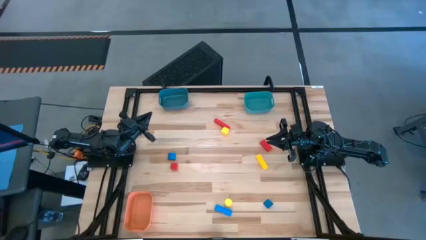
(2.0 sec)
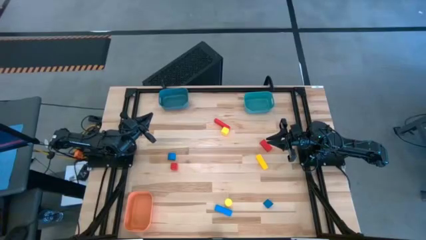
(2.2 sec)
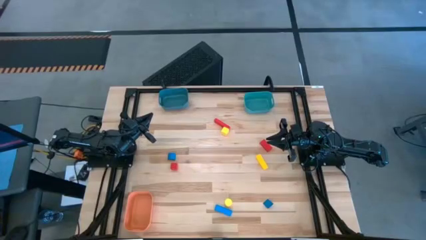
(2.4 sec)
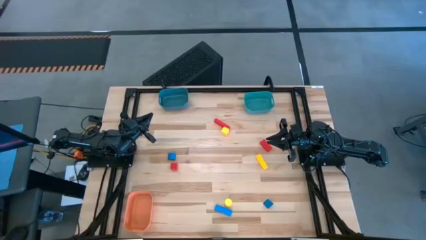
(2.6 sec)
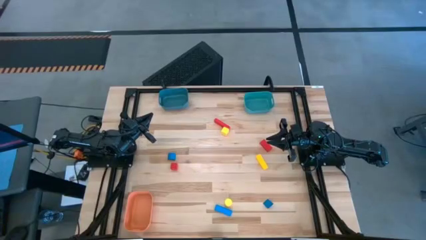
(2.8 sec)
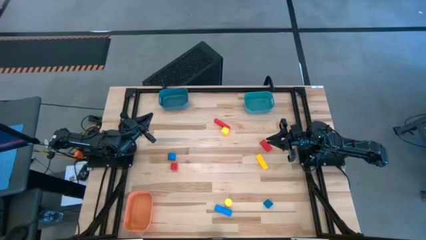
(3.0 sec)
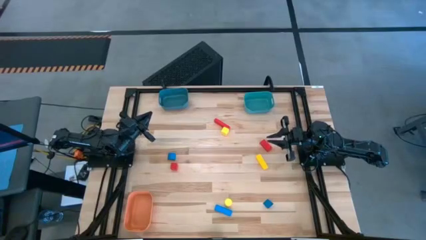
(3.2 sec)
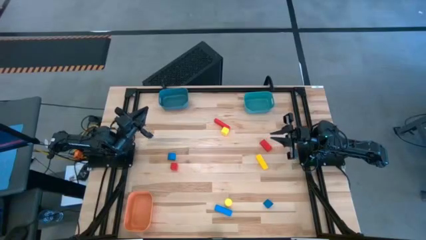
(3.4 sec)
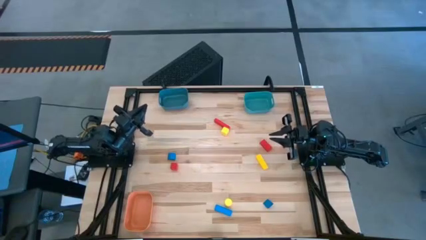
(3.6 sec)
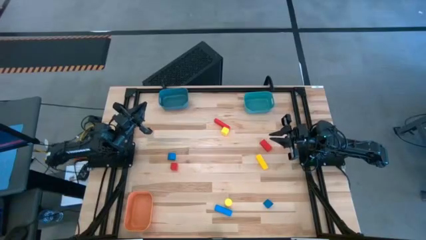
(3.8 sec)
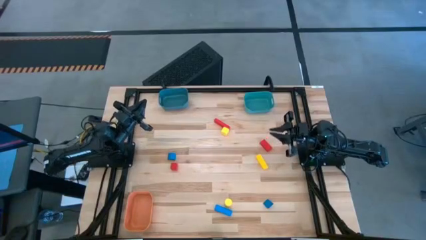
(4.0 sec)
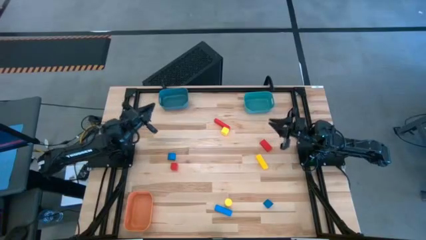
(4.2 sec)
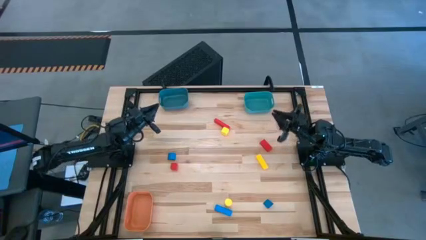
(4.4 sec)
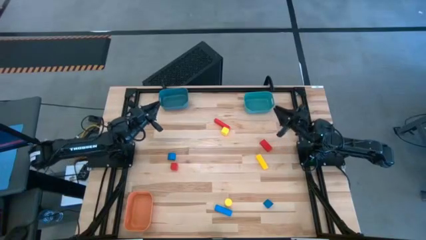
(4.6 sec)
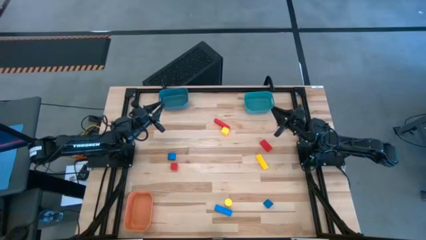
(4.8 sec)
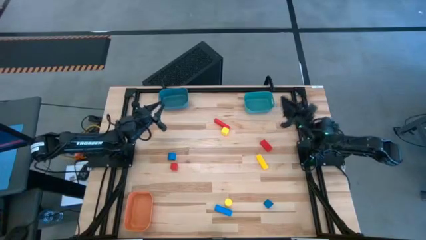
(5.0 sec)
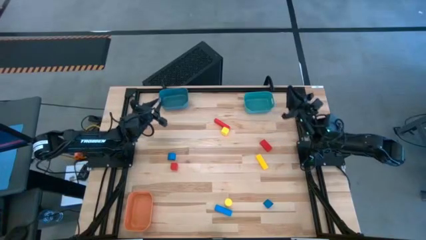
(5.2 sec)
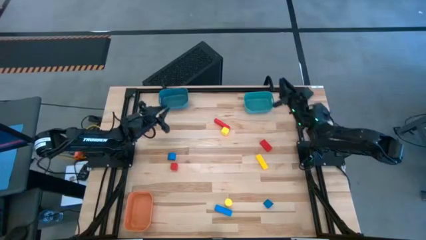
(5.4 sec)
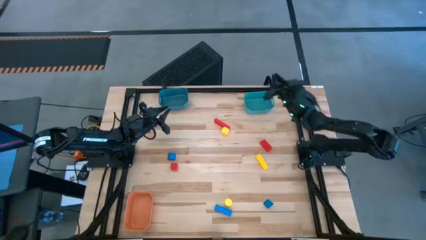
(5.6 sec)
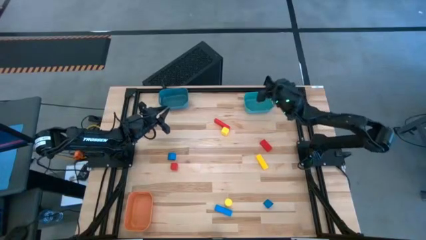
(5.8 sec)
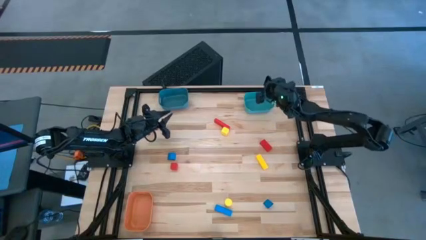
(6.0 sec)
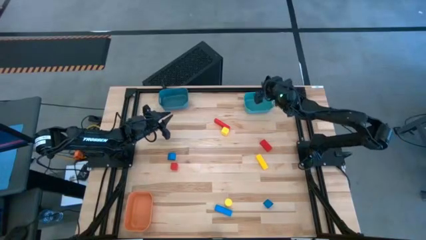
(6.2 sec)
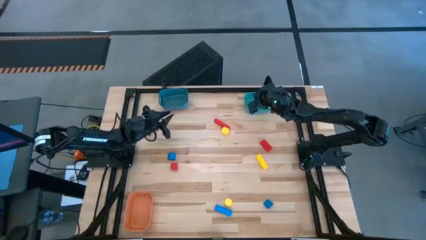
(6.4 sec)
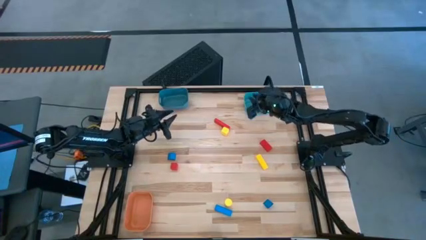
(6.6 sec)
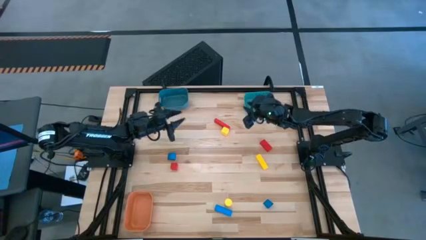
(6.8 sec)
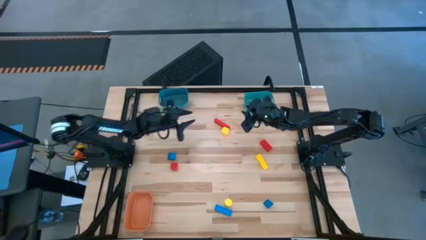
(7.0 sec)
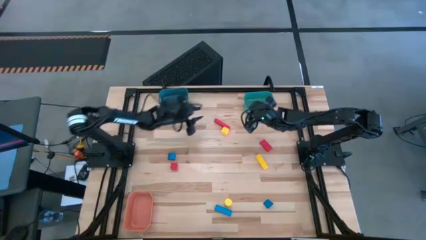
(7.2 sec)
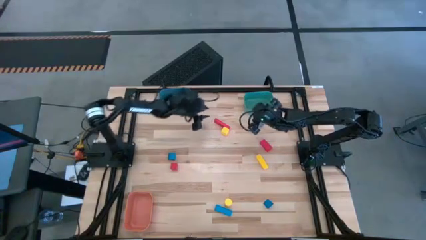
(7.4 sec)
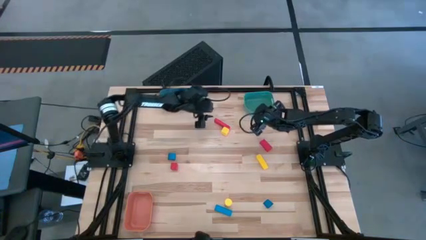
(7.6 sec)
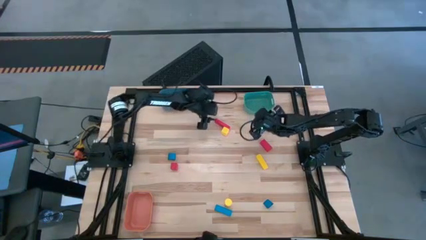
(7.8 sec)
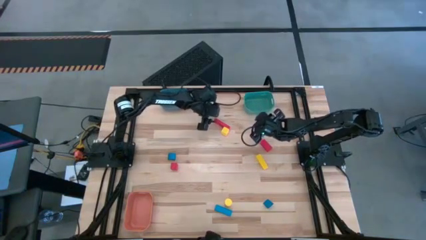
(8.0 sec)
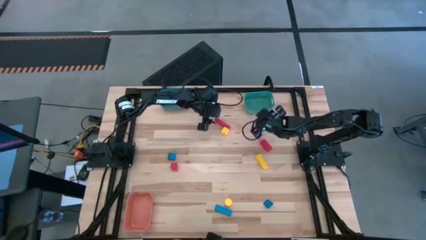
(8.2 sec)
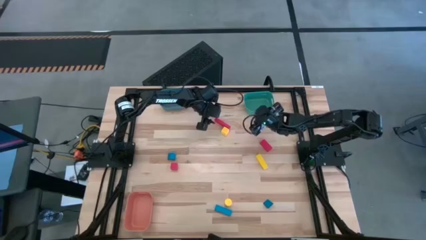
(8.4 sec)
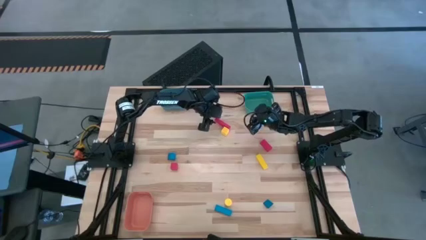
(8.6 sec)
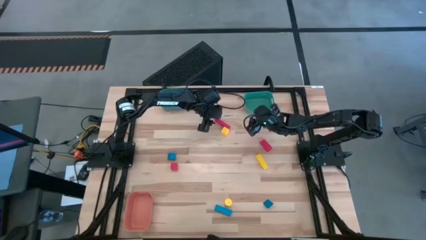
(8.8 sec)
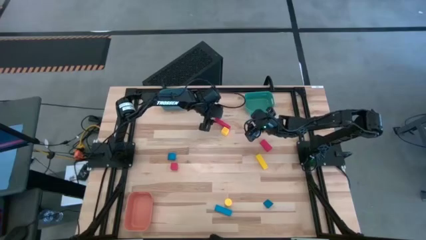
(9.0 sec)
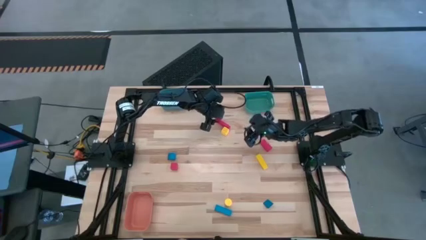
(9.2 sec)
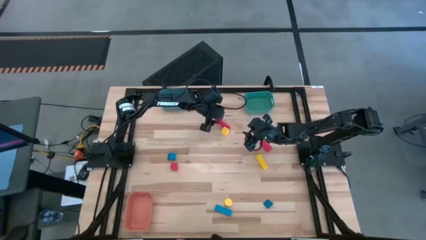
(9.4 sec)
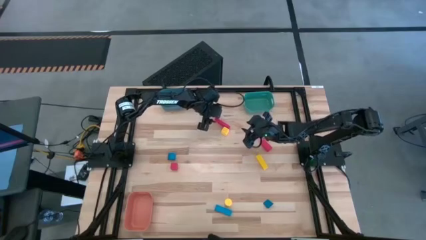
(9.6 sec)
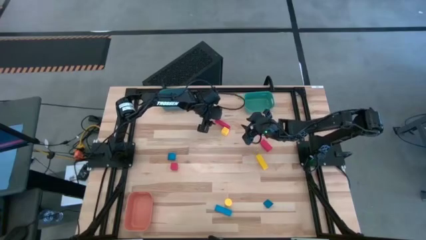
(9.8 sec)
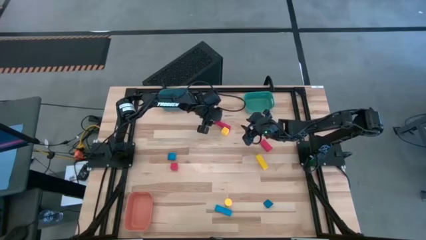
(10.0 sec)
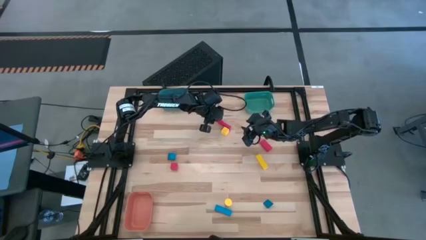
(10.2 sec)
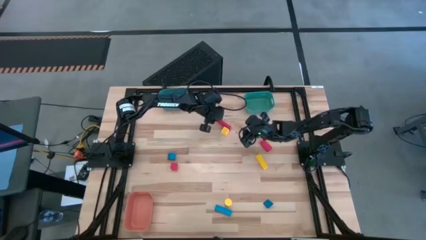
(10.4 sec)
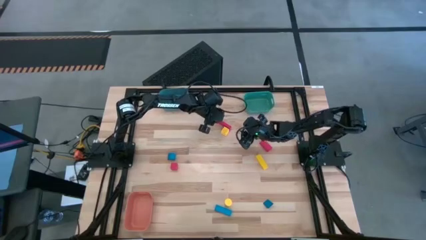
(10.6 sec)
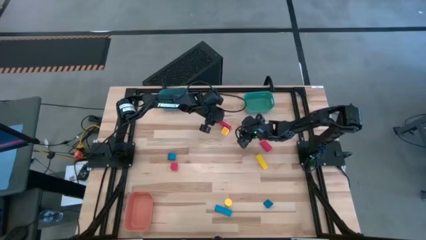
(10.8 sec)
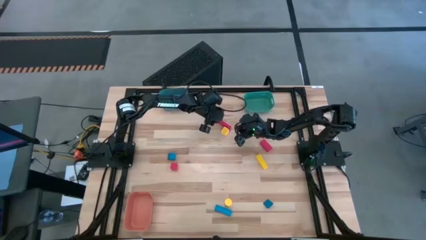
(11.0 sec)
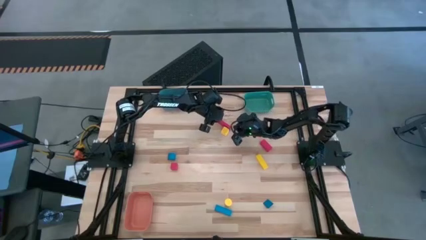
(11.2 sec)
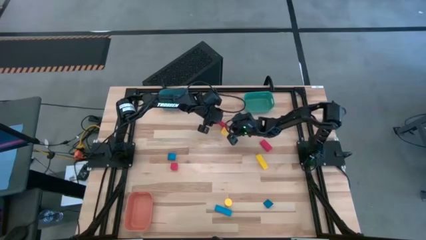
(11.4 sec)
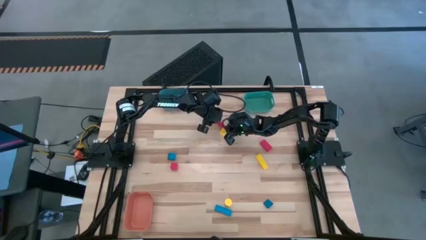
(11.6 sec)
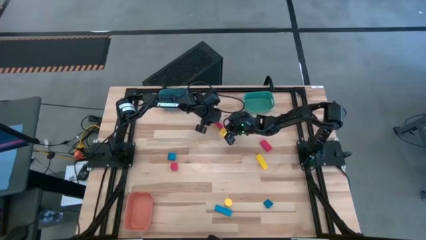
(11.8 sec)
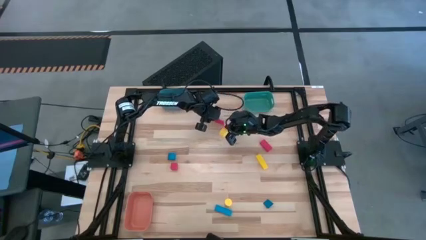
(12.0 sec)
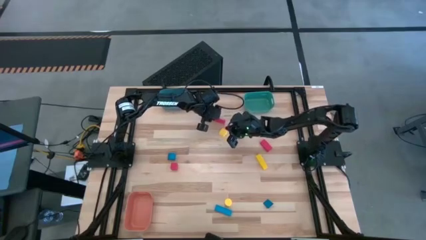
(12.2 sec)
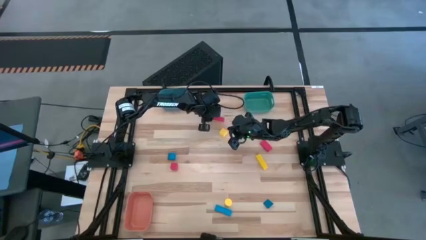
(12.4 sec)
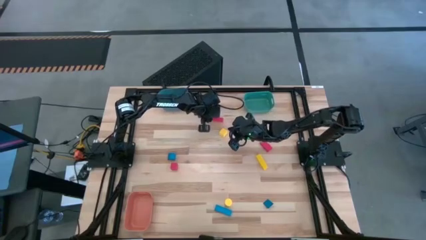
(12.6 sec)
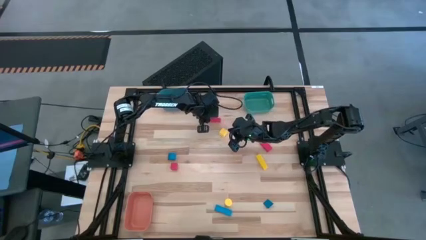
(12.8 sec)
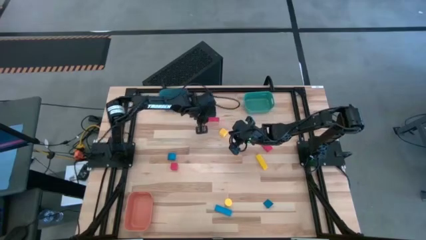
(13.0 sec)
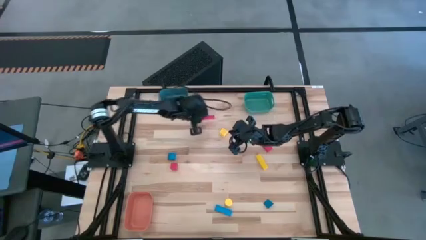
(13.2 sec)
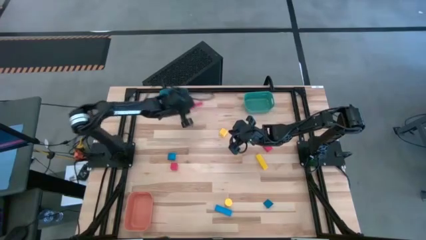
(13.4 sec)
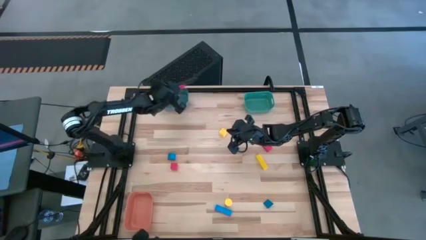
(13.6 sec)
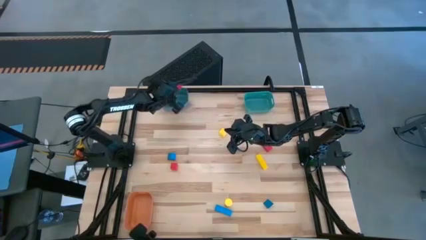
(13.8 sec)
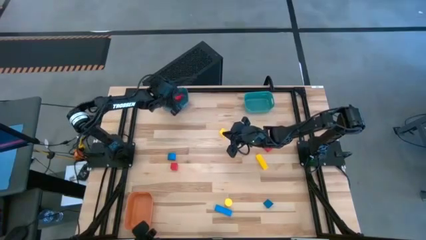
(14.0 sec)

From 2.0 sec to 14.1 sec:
Task: Sort & place blocks by color
Put the top red block into the blue bin
